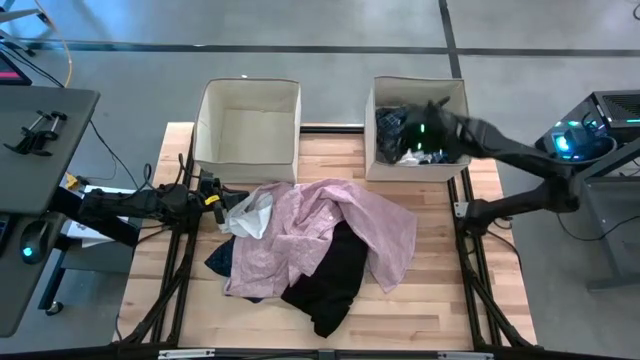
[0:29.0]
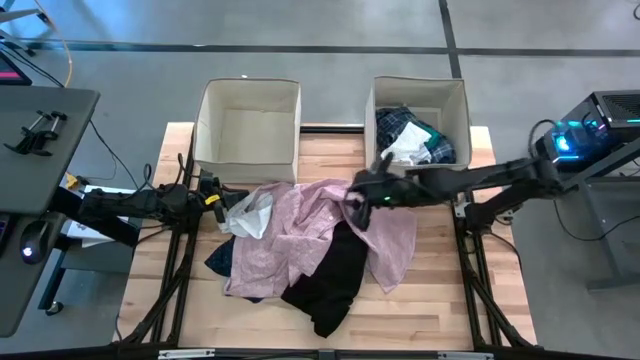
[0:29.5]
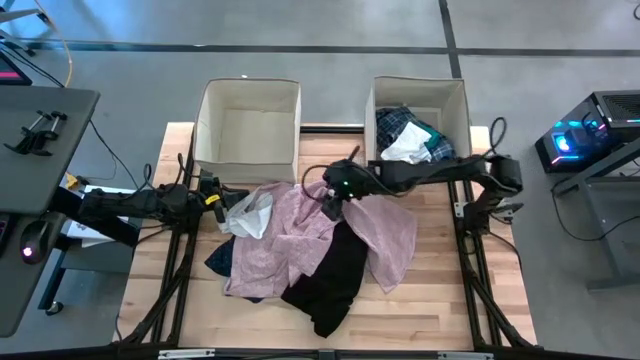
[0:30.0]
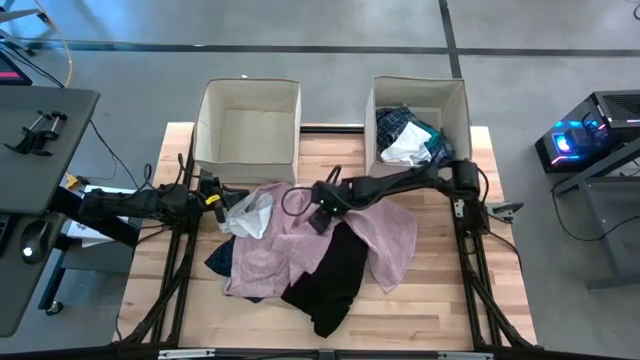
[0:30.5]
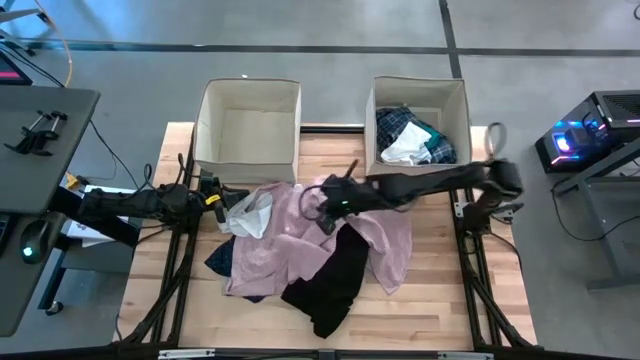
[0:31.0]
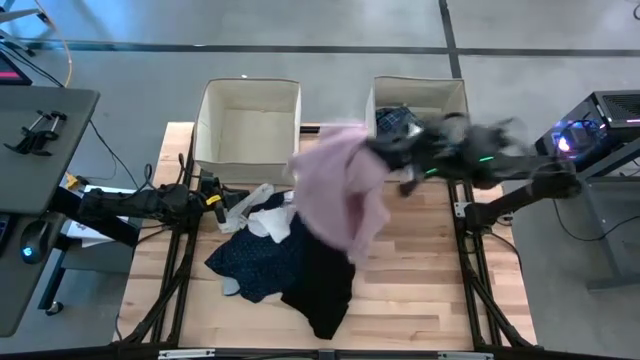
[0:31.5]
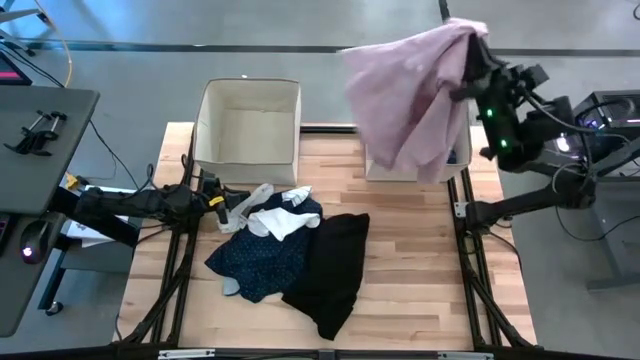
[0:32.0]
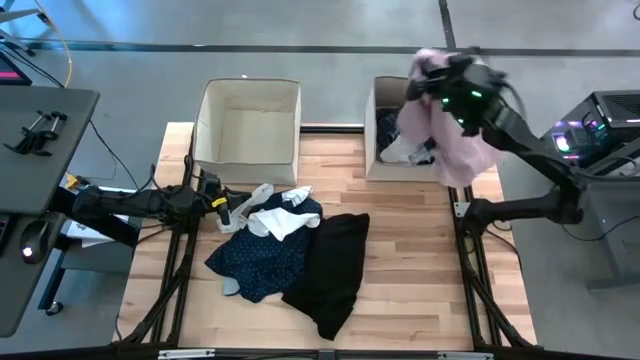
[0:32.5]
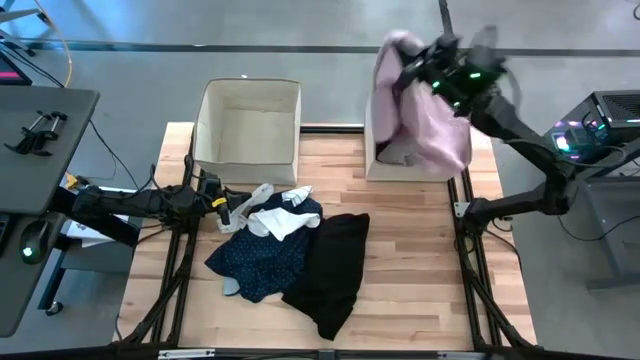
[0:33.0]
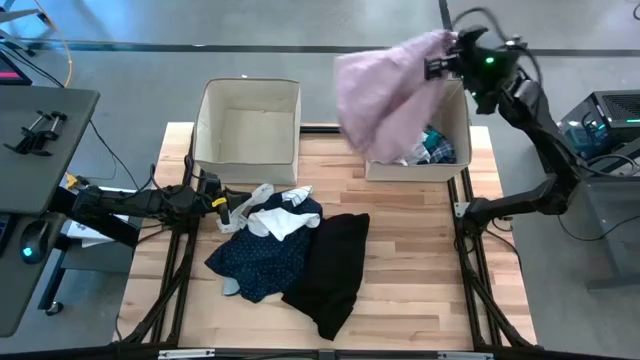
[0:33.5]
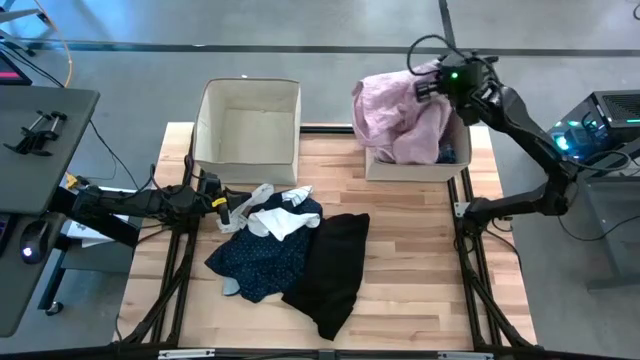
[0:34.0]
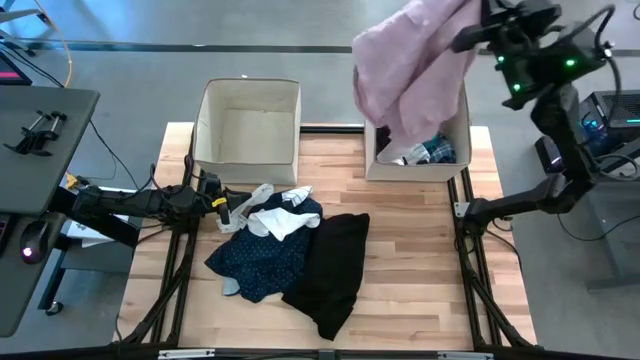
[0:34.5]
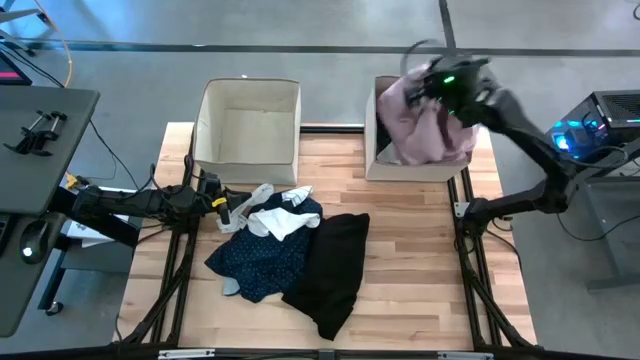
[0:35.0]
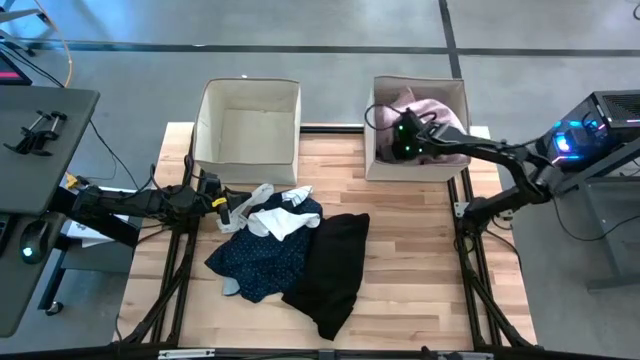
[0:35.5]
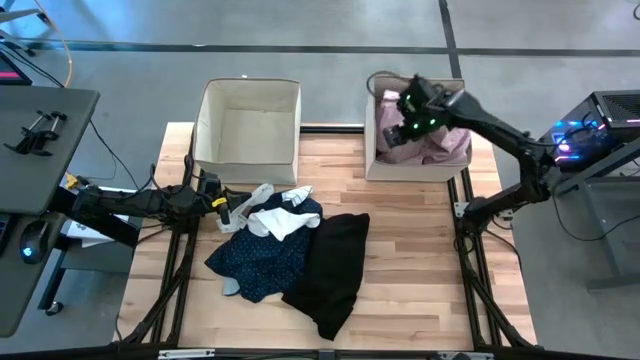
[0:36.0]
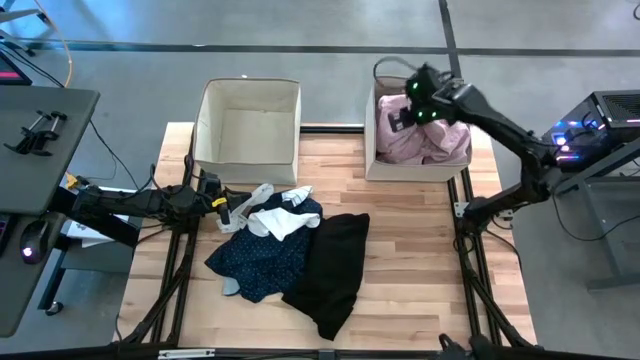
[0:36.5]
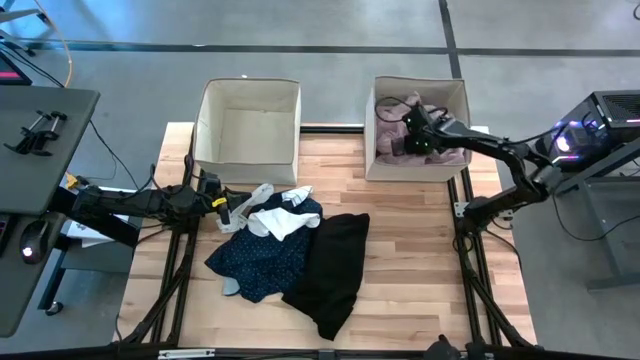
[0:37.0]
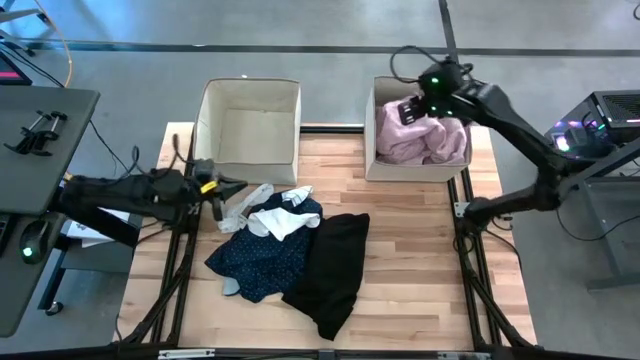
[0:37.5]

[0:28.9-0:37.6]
Task: Sort clothes
Put the pink polo into the top right laundry bin

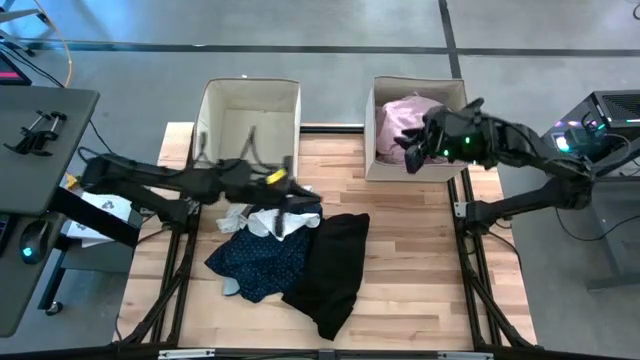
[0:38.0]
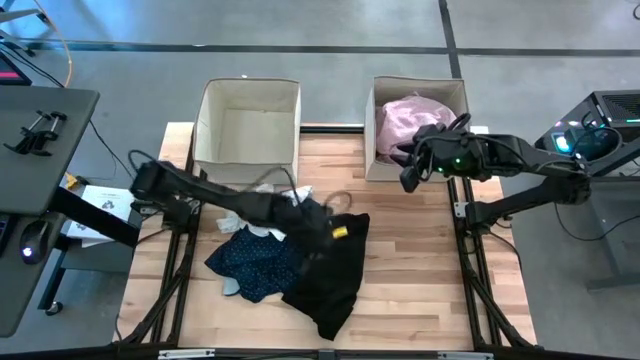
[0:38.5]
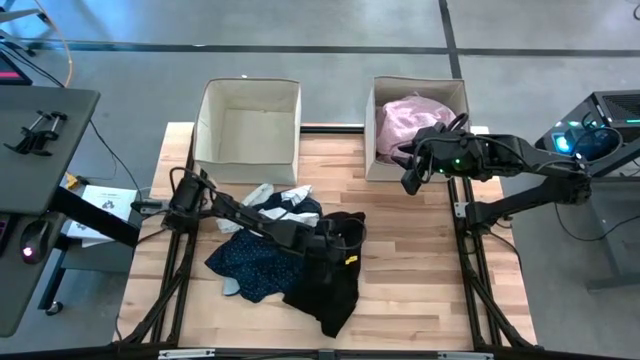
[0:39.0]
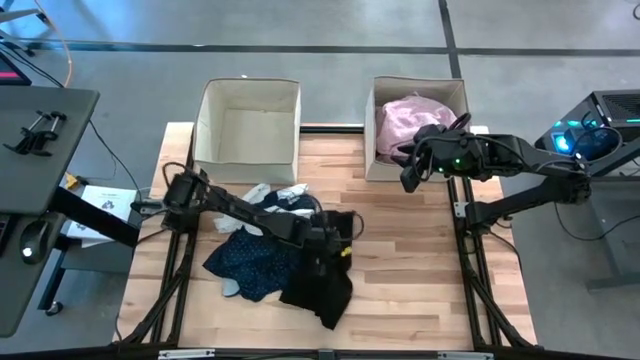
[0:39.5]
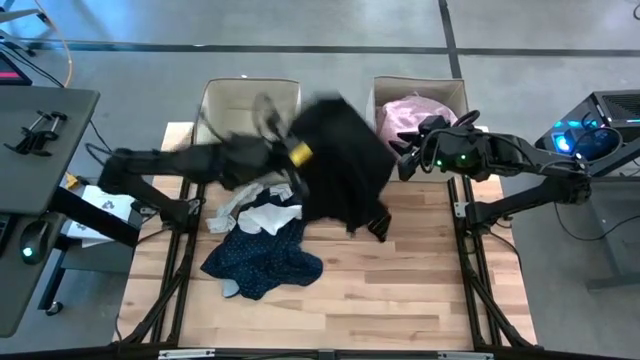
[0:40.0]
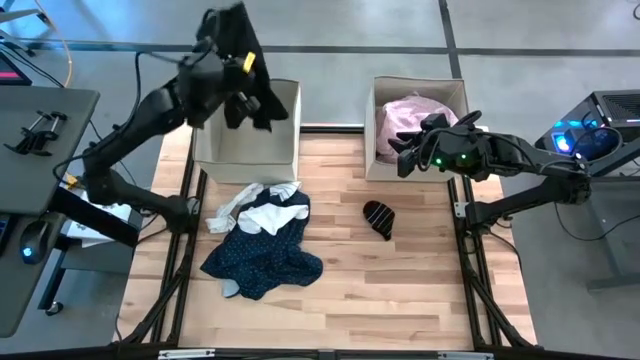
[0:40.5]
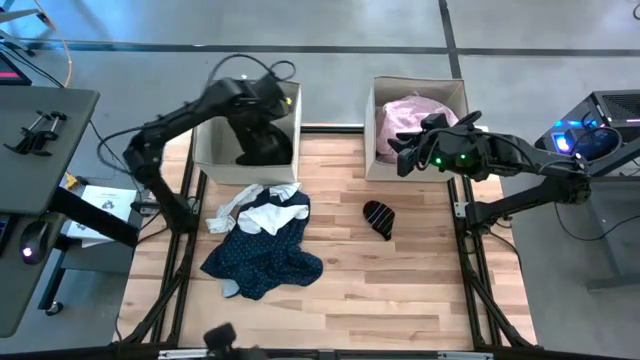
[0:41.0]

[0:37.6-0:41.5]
Put the black shirt into the top left laundry bin

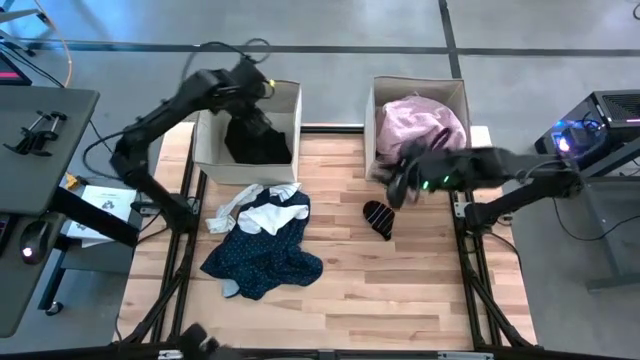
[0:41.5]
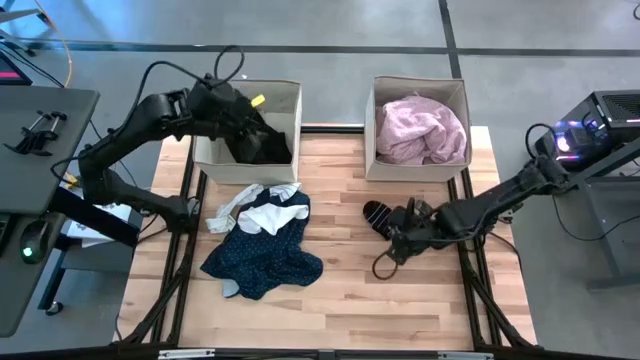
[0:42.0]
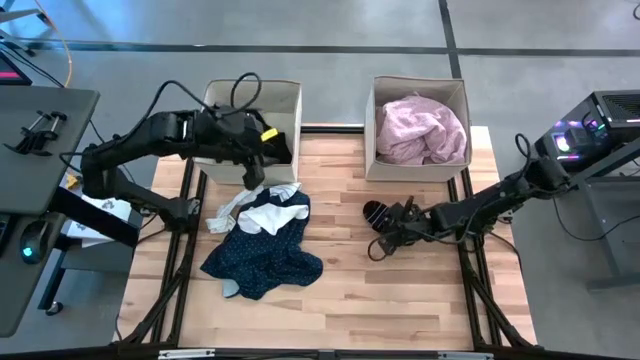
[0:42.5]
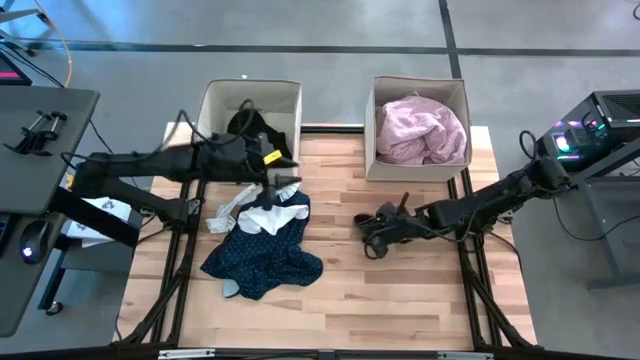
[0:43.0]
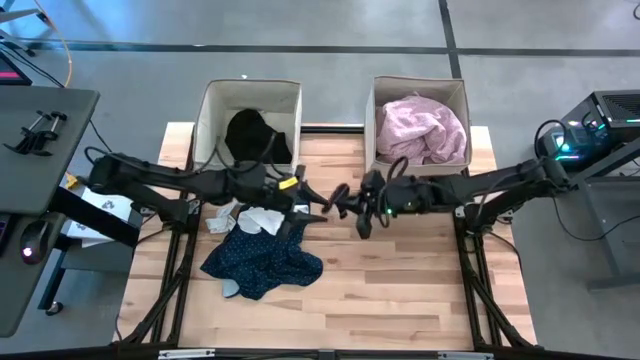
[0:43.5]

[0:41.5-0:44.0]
Put the black sock into the top left laundry bin

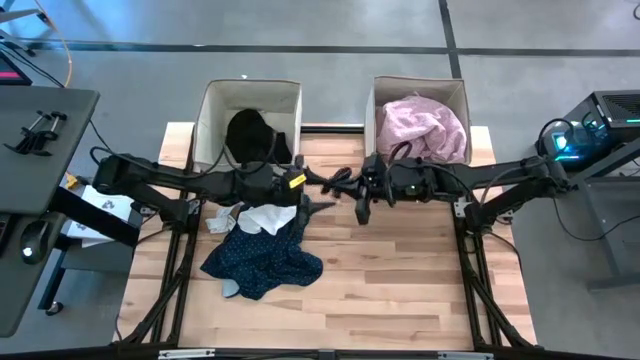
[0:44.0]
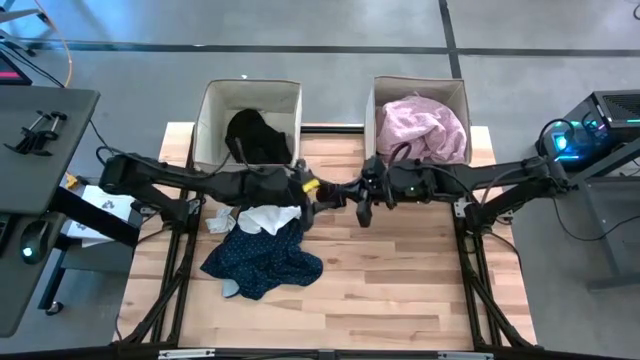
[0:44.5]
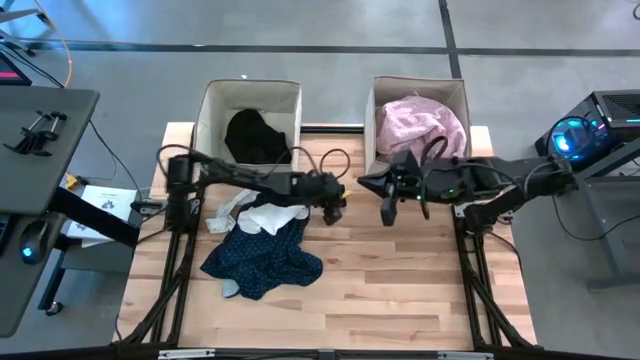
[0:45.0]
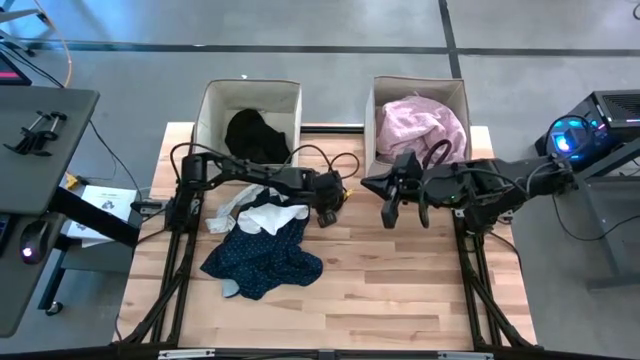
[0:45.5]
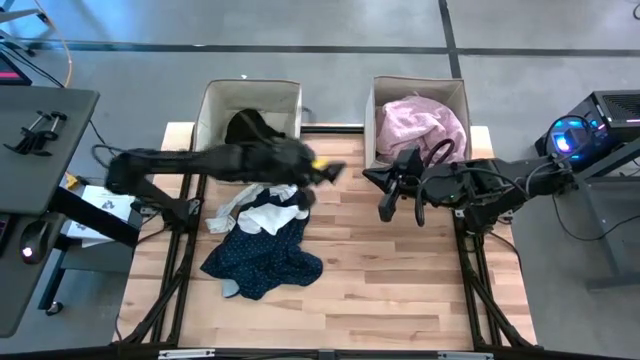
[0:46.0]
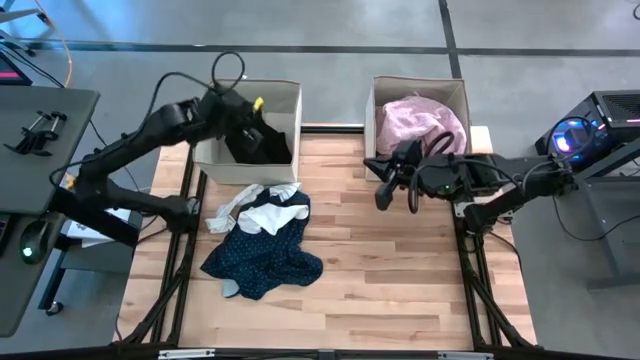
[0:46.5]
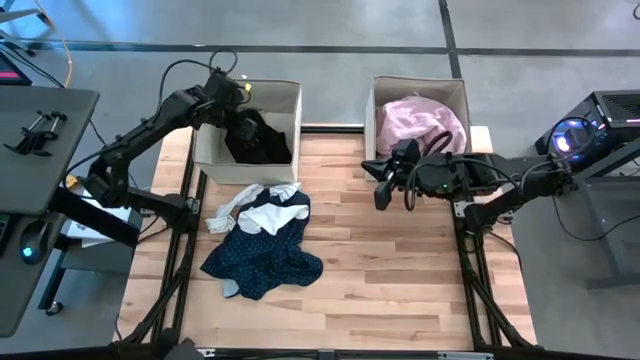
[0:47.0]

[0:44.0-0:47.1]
Put the black sock into the top left laundry bin

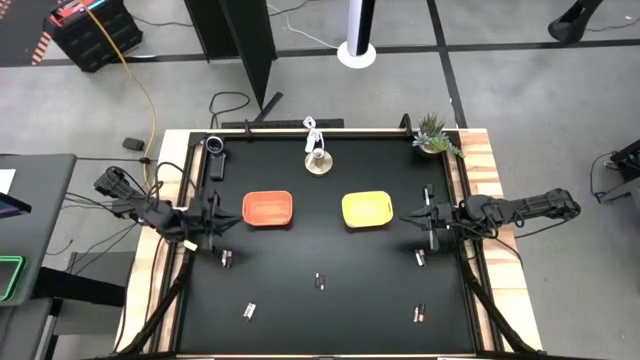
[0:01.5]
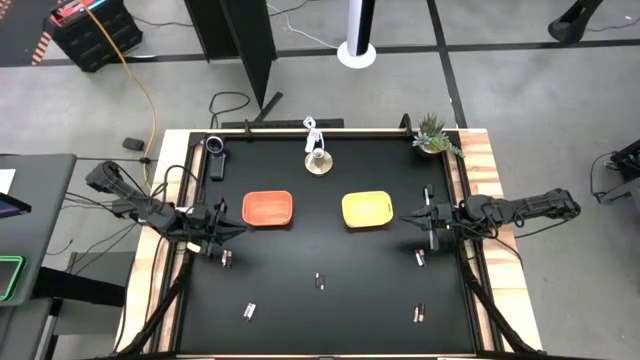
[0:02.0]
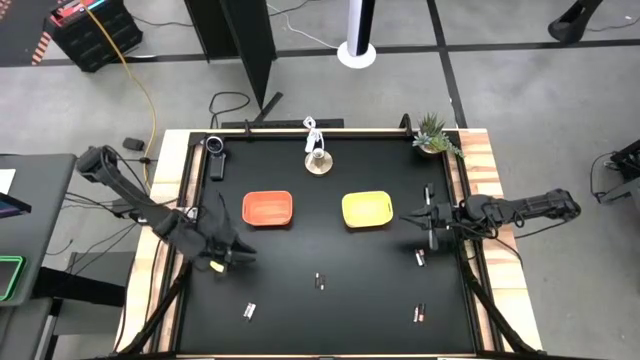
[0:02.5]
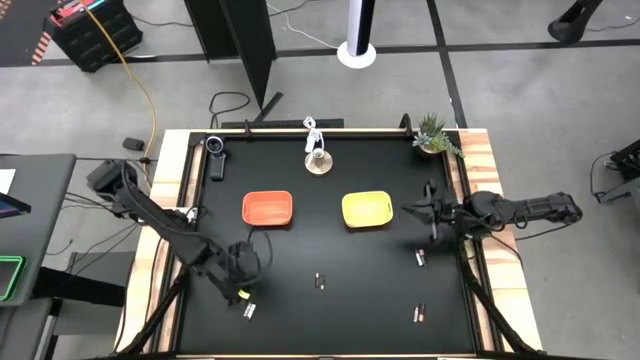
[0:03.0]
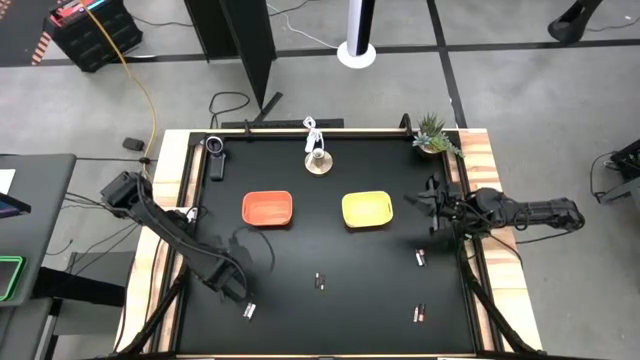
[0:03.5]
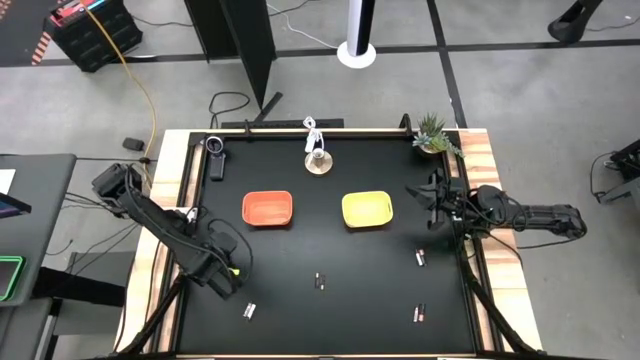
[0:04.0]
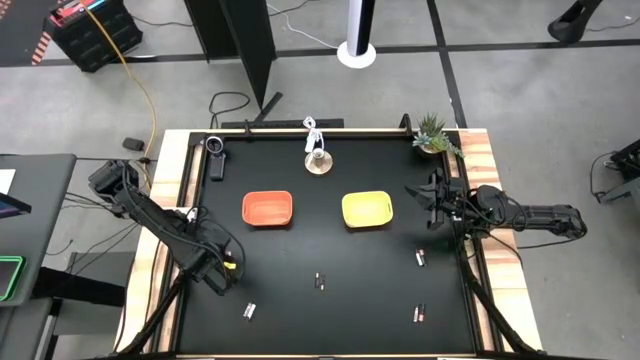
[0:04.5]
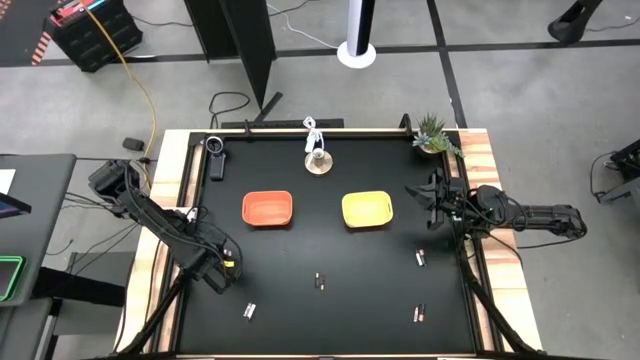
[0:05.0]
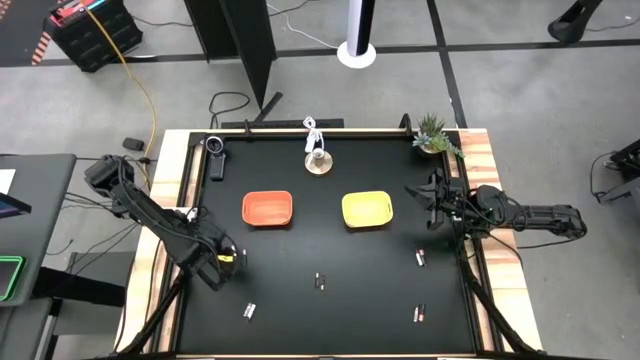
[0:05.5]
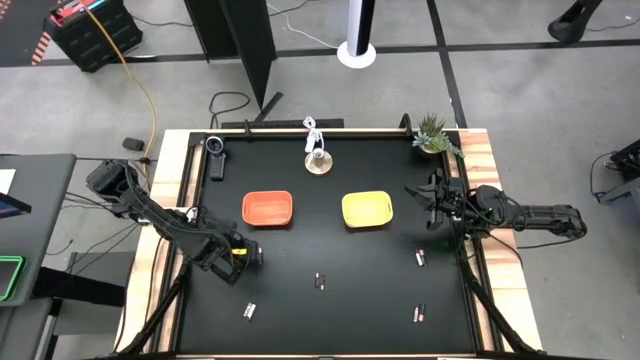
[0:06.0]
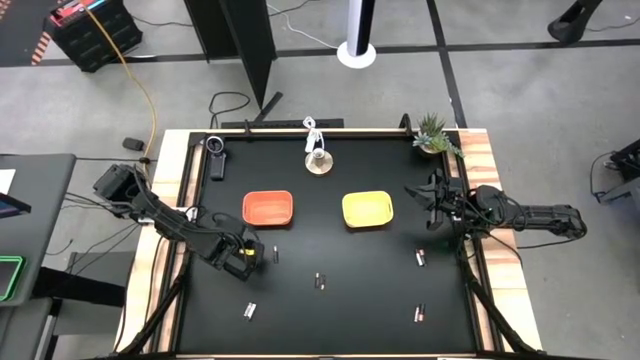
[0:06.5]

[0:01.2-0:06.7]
Task: Sort batteries
Put the silver battery into the orange bin
